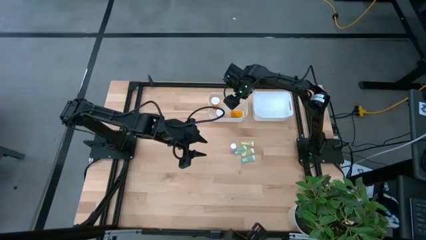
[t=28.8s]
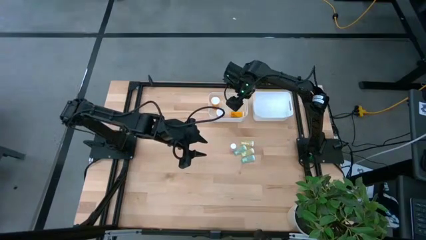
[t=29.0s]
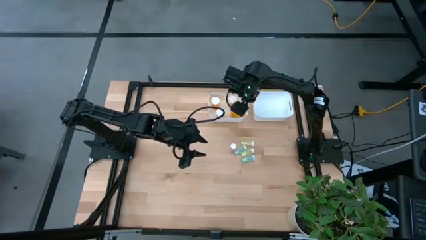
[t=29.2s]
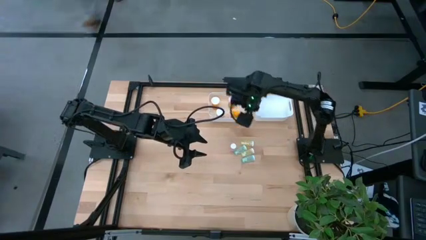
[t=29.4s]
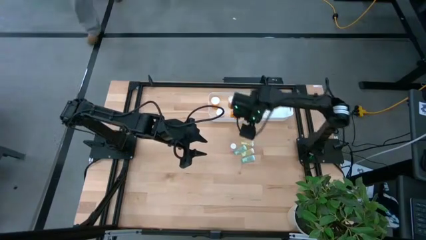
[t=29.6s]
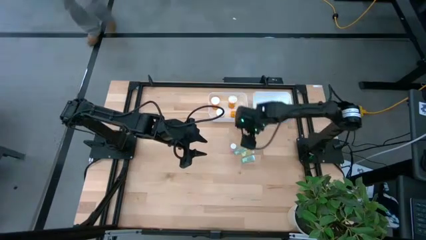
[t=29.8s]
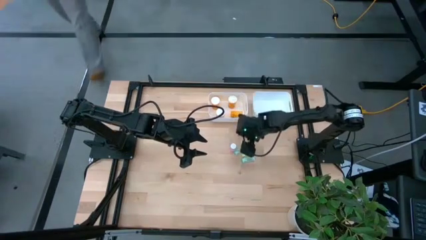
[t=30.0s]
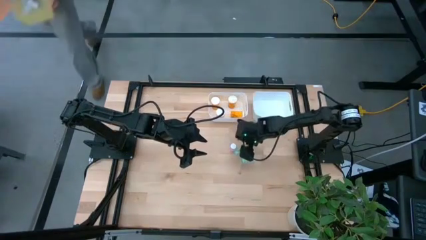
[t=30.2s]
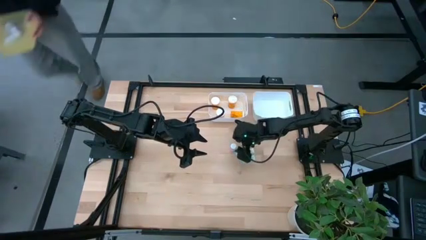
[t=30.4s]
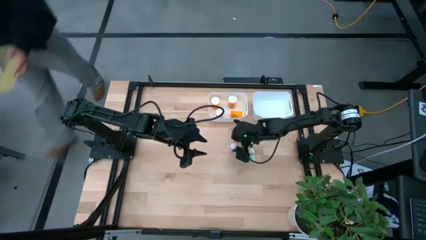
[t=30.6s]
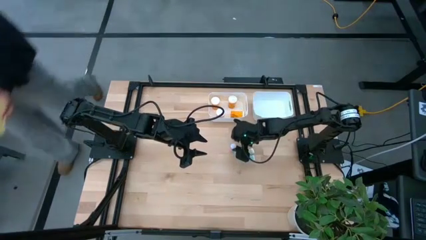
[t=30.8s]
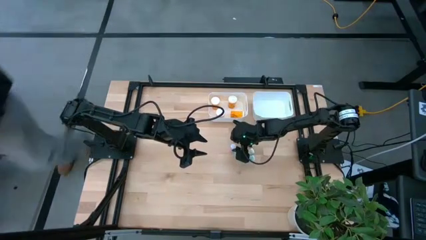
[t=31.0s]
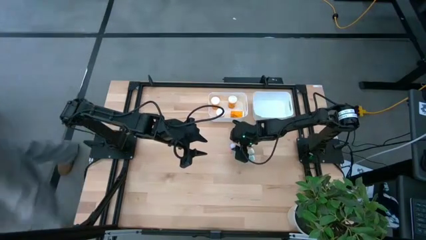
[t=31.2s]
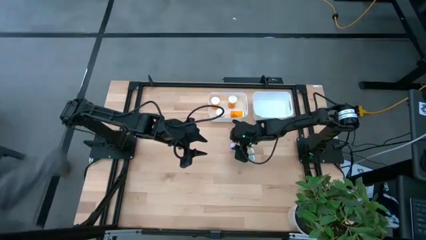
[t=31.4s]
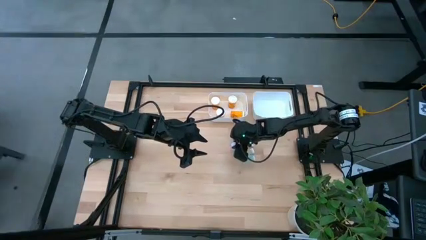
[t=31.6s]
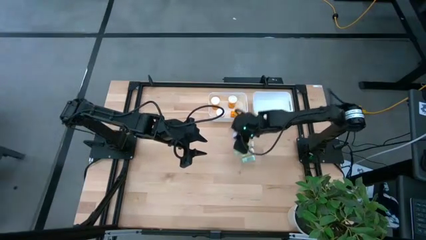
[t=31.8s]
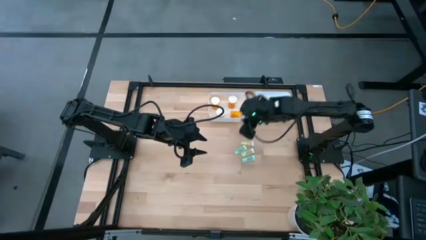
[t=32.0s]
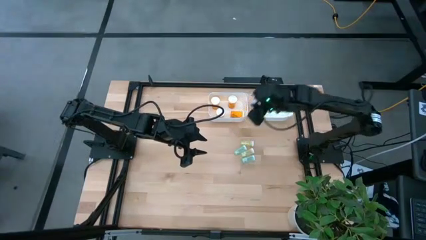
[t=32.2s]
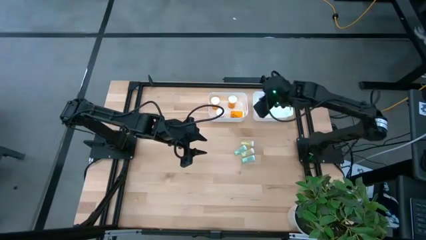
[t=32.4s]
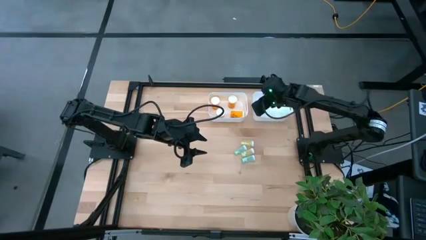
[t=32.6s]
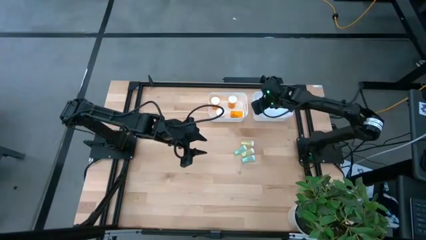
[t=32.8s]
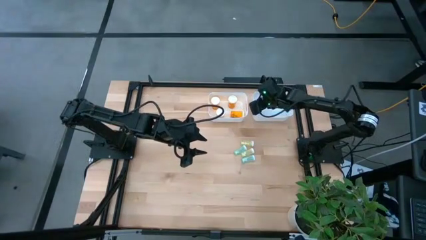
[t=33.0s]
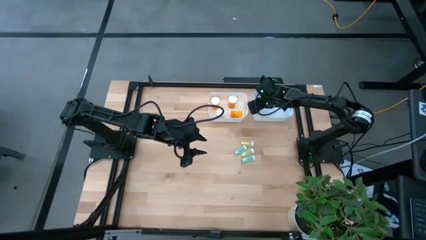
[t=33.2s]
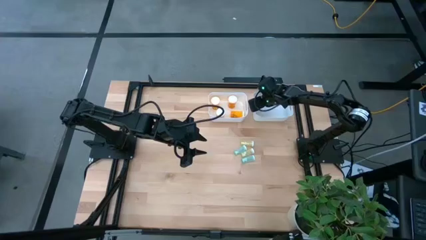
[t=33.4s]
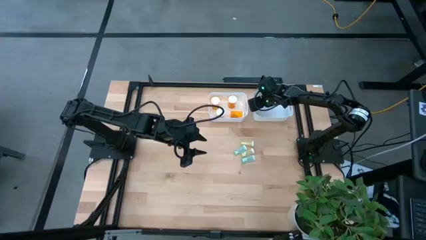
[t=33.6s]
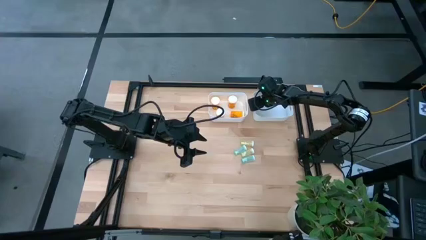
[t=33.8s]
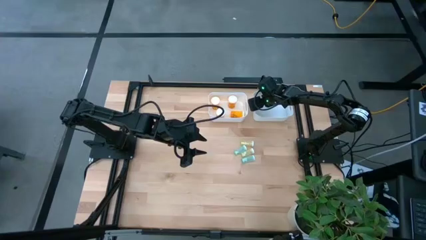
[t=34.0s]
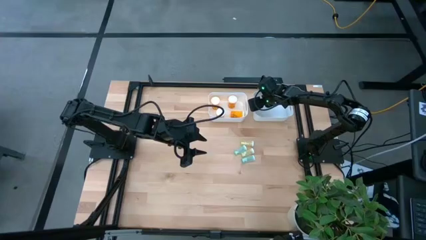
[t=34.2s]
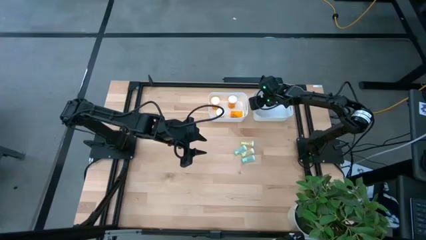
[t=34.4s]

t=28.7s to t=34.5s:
Task: Pick and place medicine bottles into bin by pill shape (circle, oval)
Put the pink tablet bottle into the right white bin

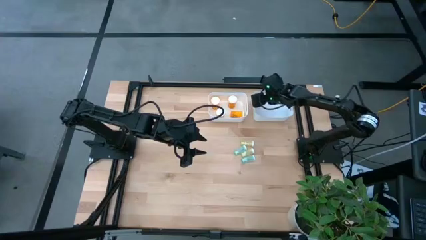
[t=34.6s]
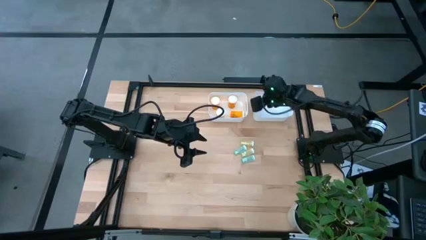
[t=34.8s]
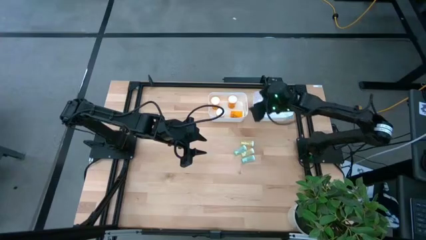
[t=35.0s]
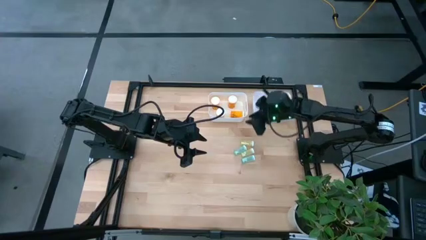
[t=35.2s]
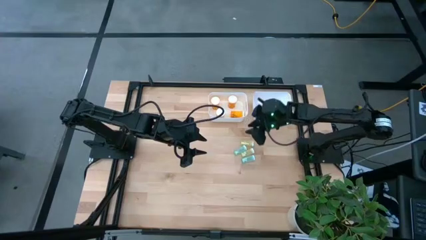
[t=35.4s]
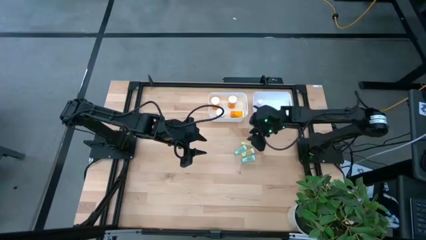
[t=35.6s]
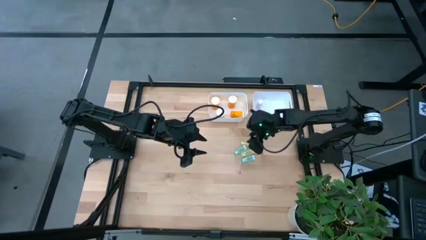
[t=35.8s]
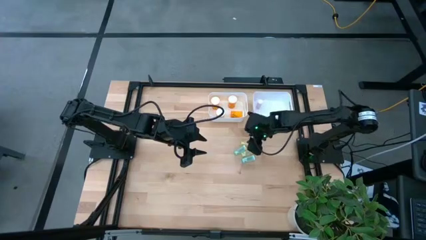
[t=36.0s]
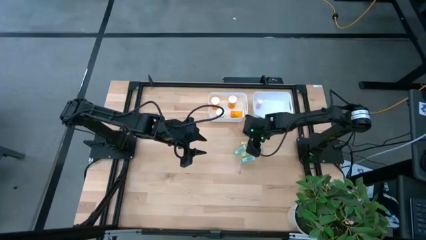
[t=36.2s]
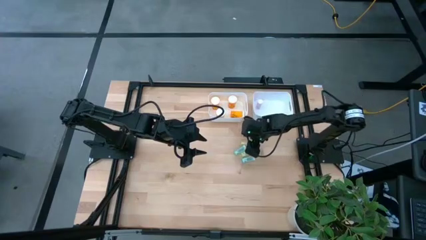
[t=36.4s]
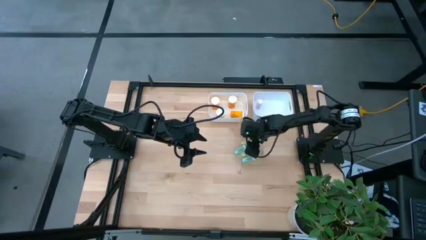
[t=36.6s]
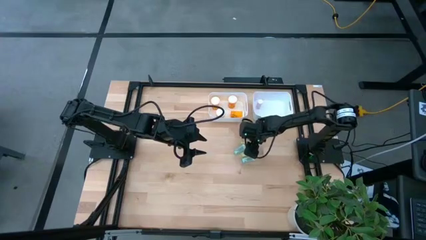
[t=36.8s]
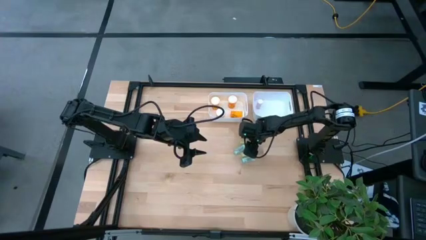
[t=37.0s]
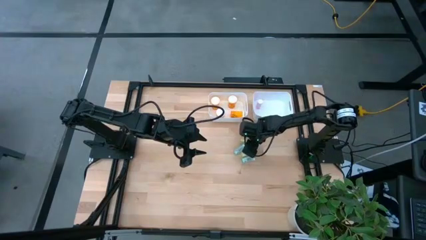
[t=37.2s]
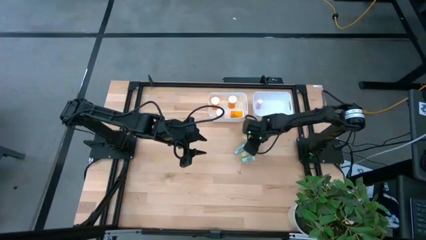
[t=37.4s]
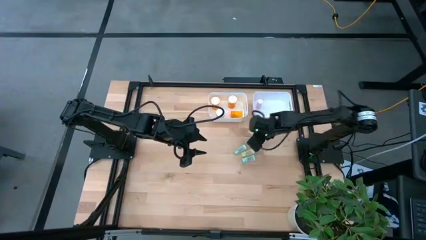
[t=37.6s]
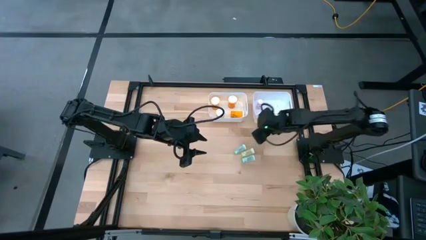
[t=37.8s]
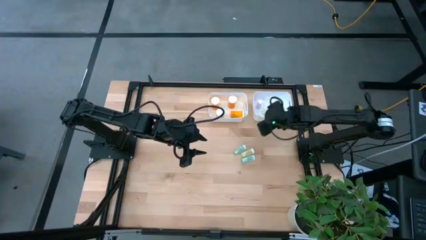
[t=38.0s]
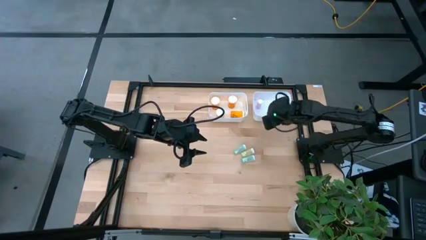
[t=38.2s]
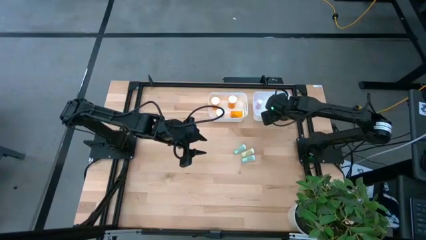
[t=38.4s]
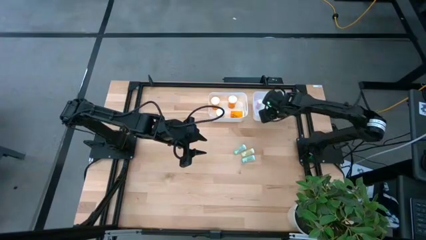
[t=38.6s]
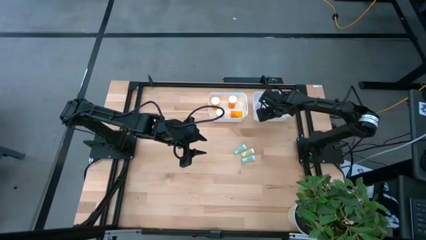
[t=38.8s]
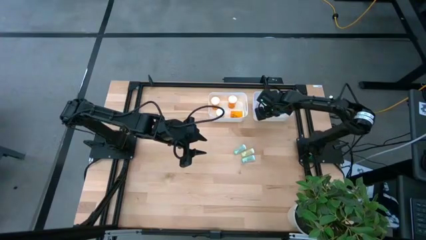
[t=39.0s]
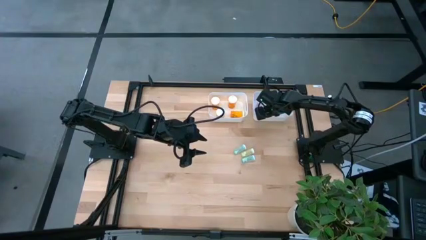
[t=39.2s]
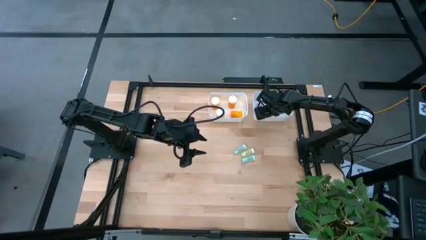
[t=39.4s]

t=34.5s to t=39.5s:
Put the yellow tablet bottle into the right white bin

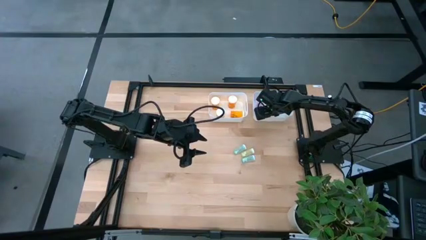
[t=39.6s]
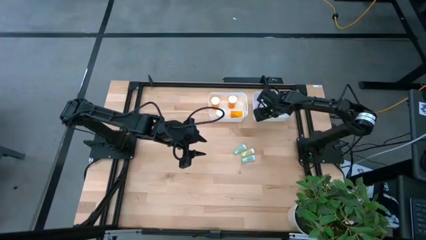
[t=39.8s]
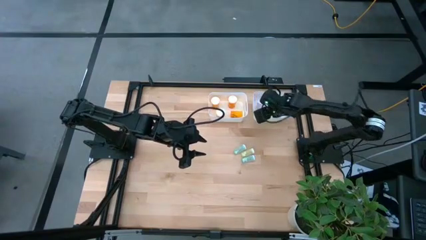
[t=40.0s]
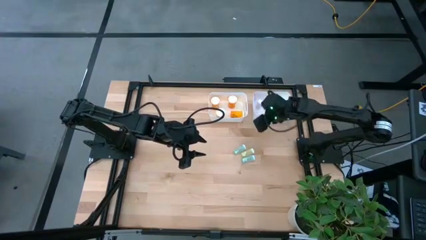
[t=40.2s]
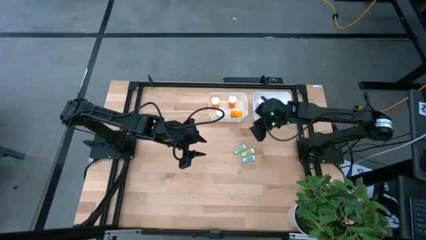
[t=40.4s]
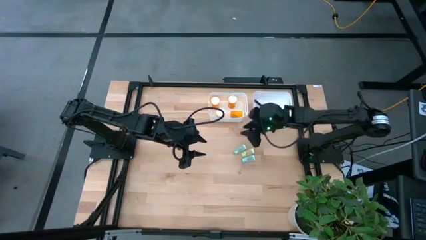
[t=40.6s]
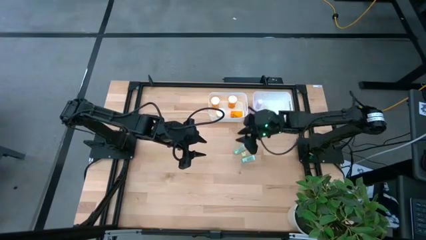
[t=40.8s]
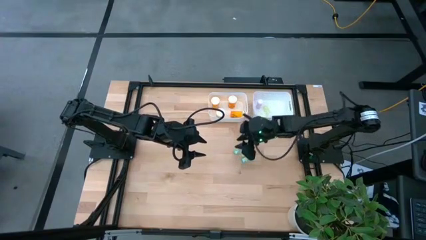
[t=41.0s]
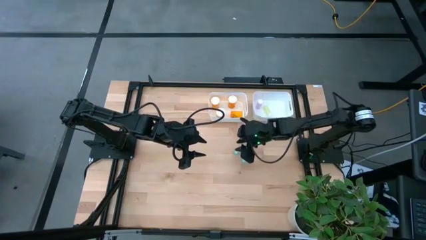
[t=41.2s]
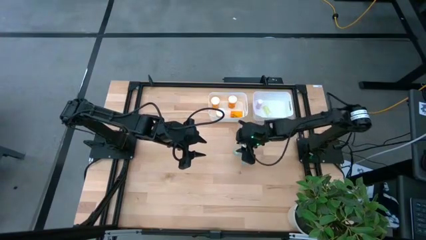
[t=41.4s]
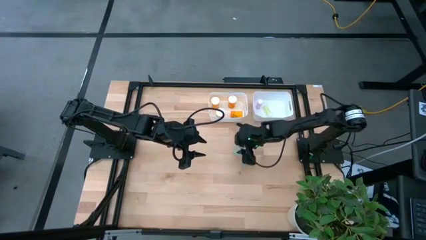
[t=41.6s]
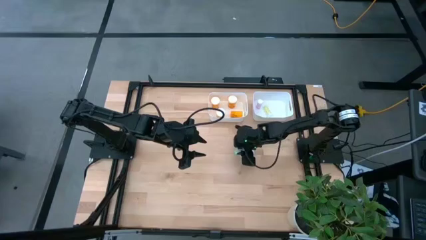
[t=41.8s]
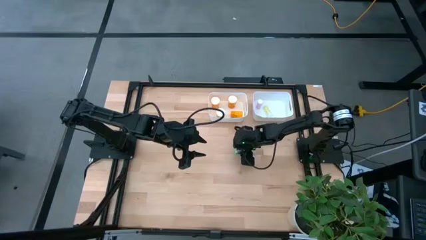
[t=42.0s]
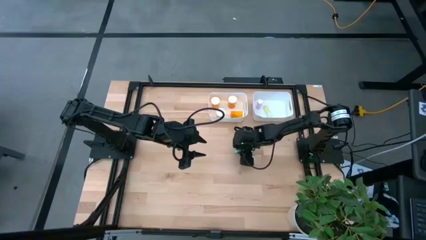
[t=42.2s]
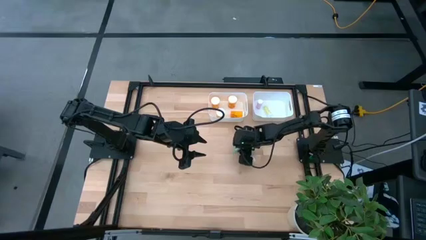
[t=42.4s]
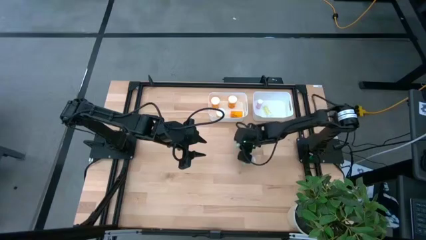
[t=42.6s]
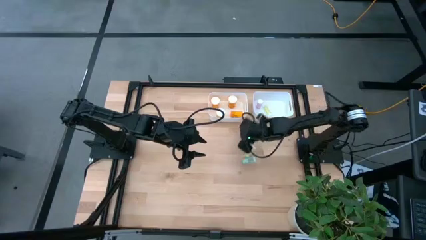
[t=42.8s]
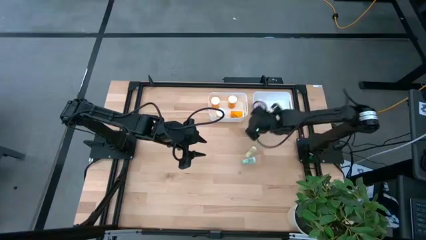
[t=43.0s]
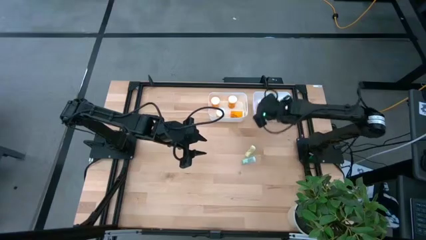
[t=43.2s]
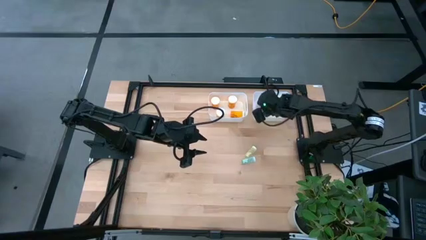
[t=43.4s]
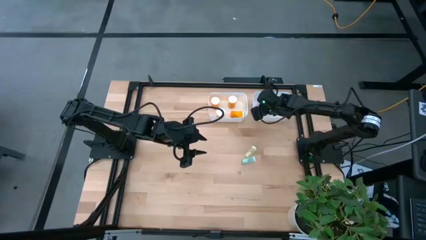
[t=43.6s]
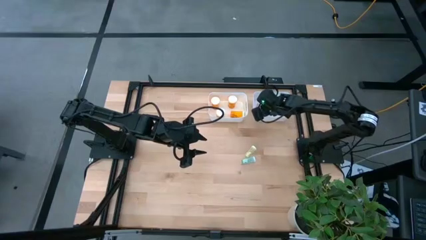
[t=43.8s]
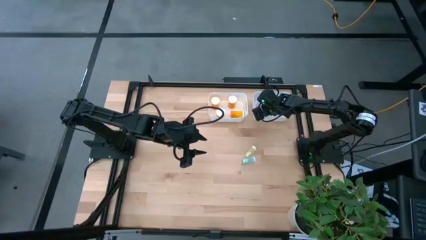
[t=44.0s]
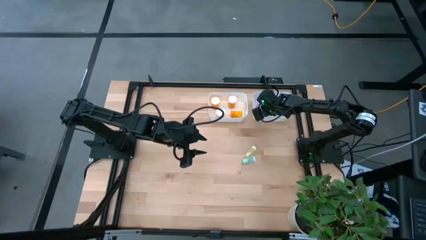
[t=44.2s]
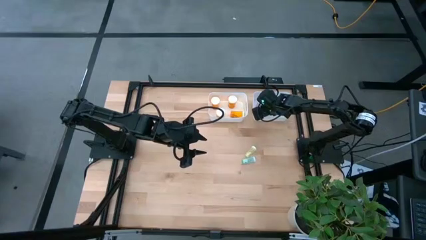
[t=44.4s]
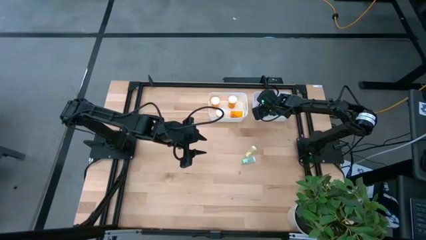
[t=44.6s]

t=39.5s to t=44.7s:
Put the blue tablet bottle into the right white bin
